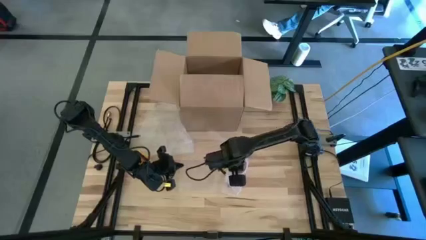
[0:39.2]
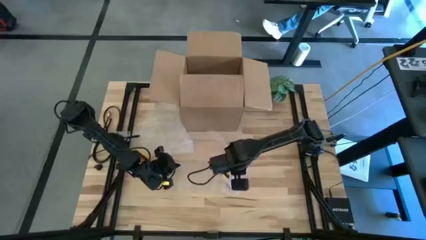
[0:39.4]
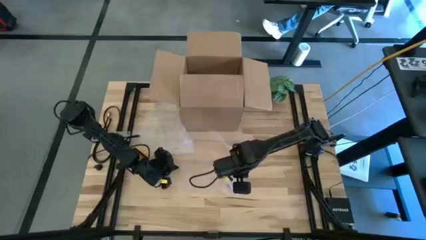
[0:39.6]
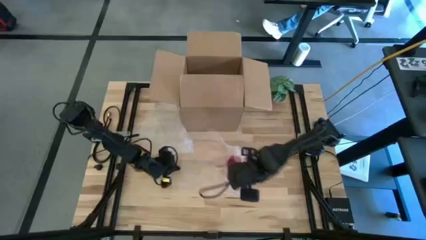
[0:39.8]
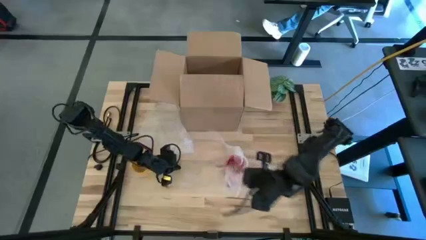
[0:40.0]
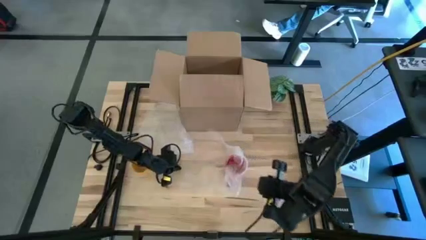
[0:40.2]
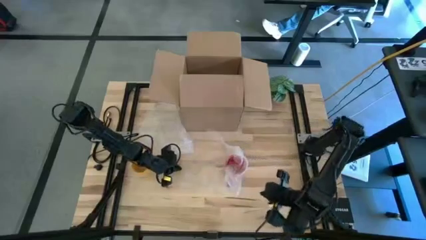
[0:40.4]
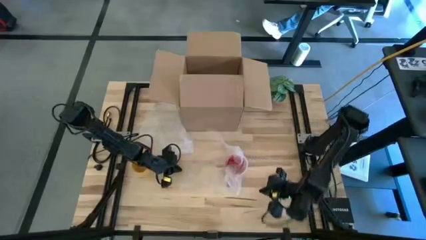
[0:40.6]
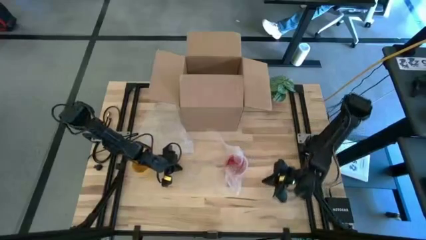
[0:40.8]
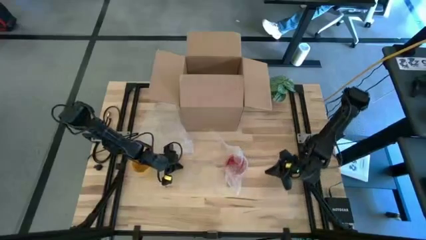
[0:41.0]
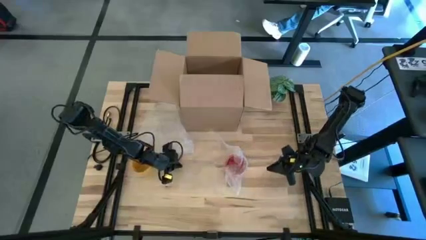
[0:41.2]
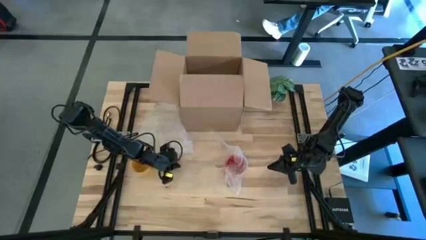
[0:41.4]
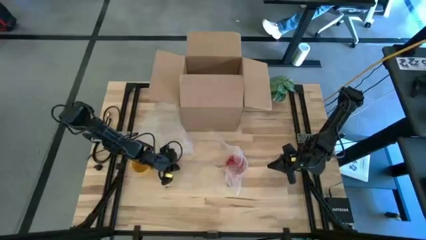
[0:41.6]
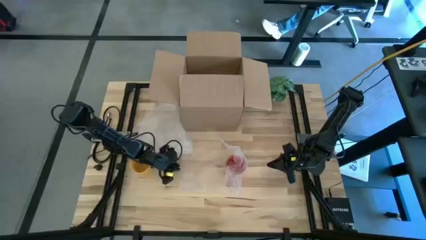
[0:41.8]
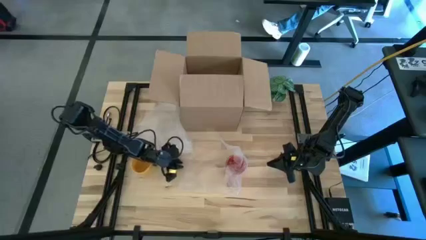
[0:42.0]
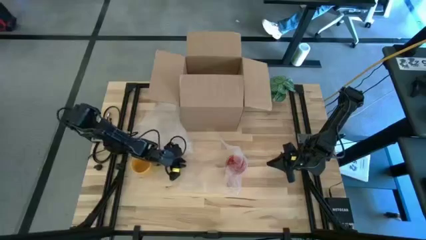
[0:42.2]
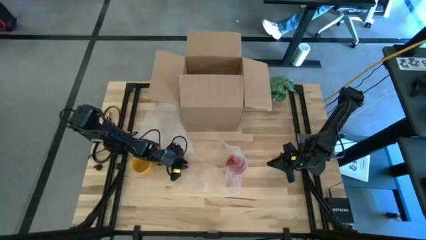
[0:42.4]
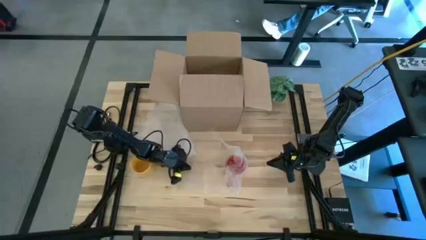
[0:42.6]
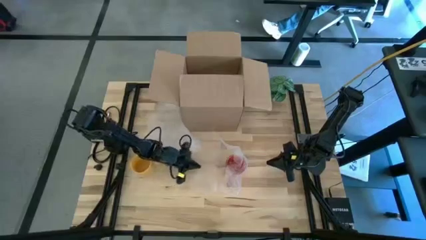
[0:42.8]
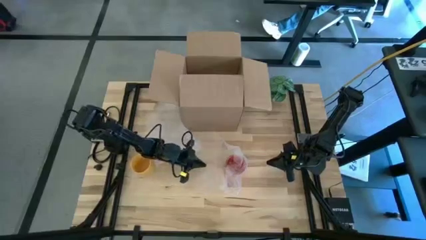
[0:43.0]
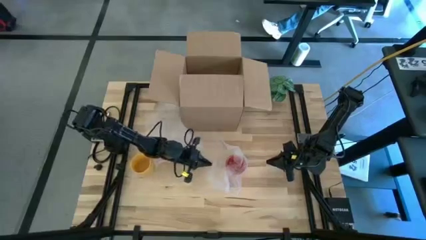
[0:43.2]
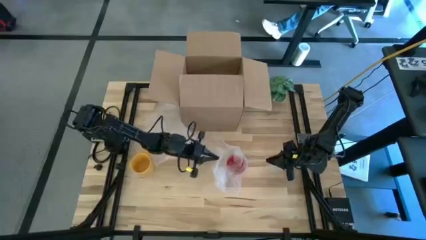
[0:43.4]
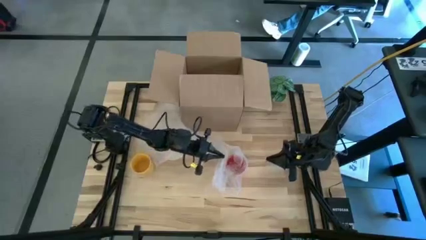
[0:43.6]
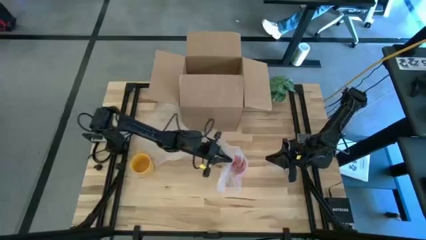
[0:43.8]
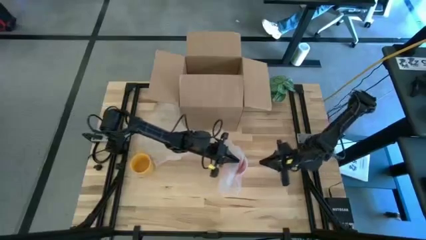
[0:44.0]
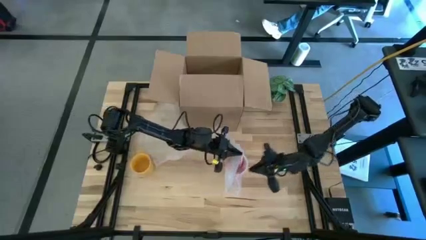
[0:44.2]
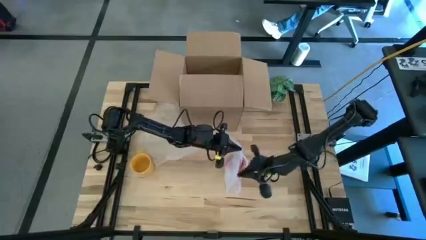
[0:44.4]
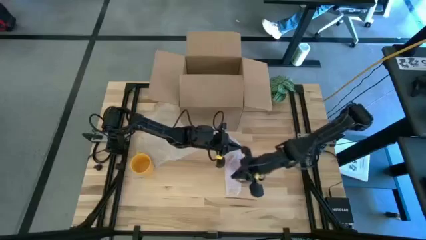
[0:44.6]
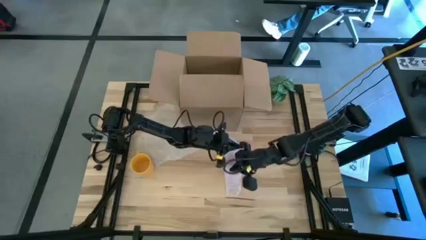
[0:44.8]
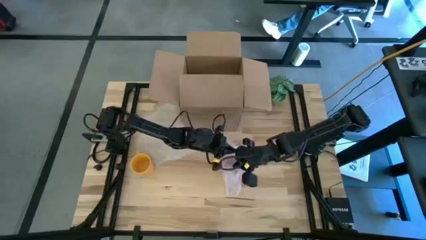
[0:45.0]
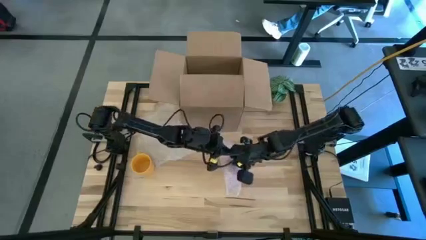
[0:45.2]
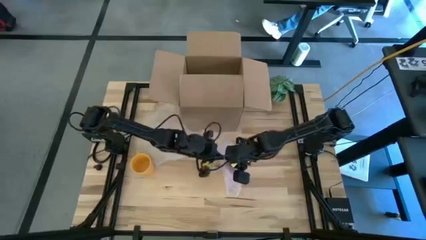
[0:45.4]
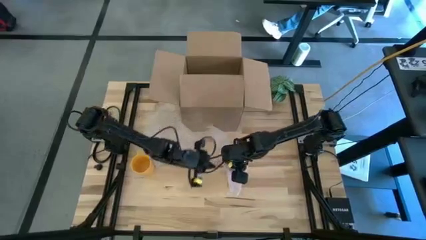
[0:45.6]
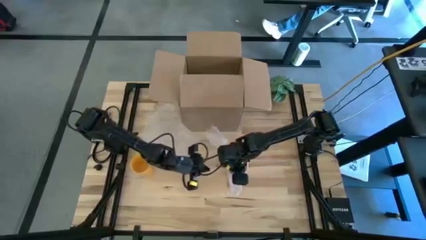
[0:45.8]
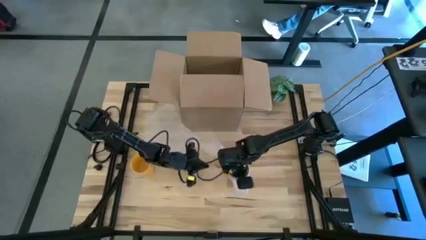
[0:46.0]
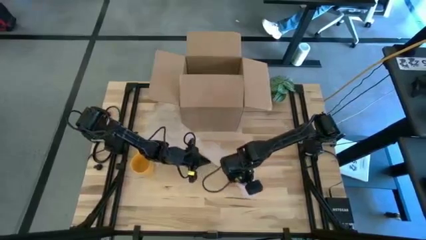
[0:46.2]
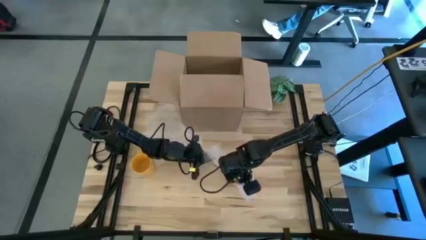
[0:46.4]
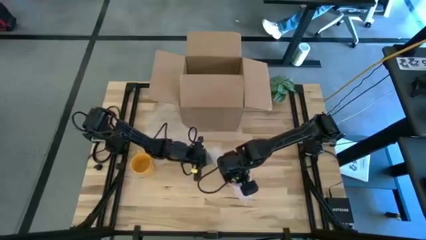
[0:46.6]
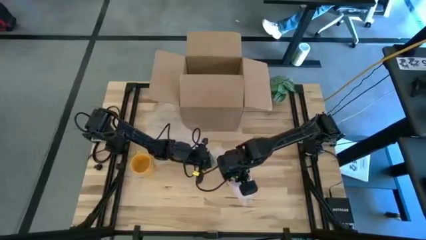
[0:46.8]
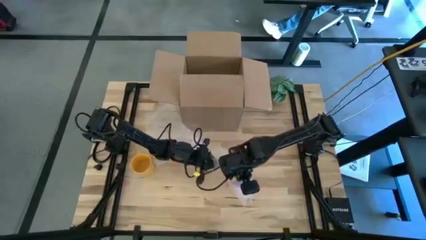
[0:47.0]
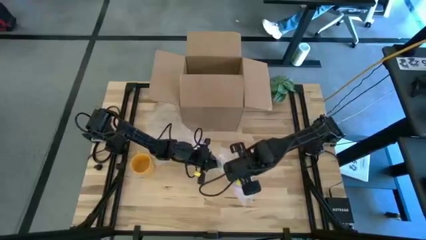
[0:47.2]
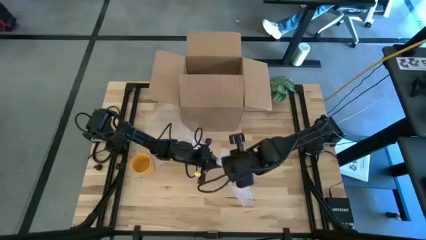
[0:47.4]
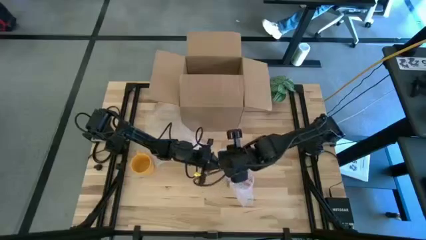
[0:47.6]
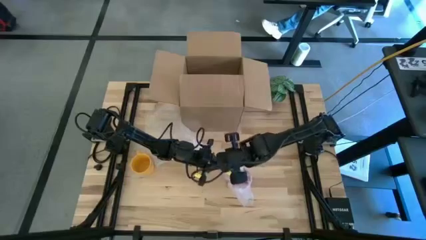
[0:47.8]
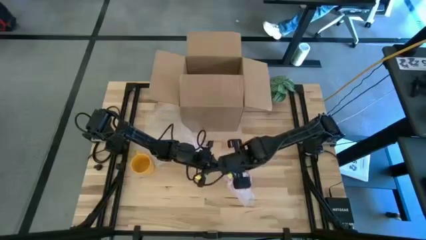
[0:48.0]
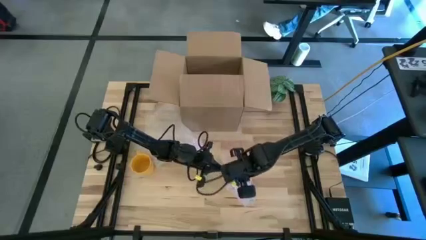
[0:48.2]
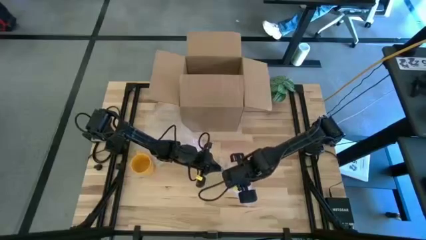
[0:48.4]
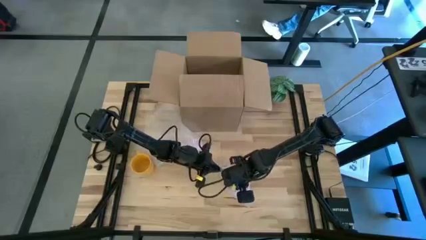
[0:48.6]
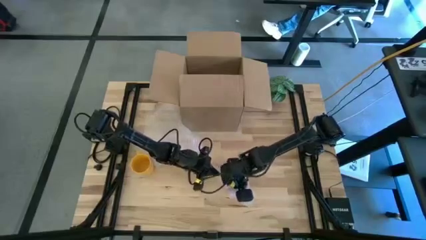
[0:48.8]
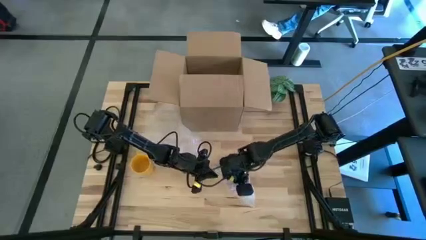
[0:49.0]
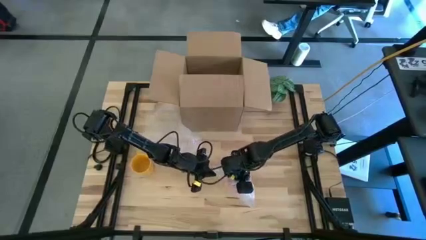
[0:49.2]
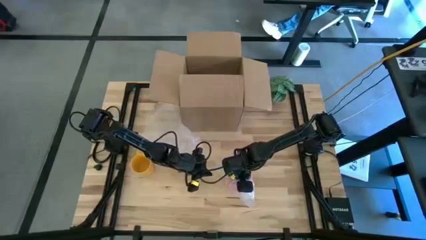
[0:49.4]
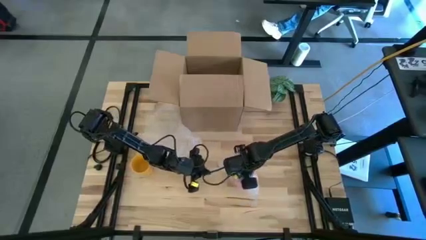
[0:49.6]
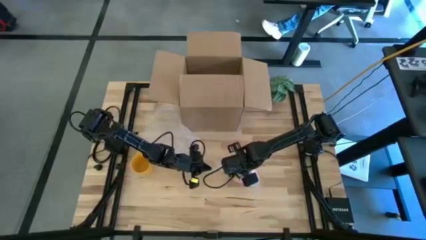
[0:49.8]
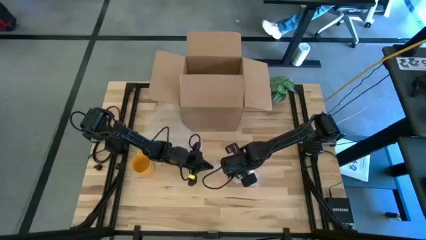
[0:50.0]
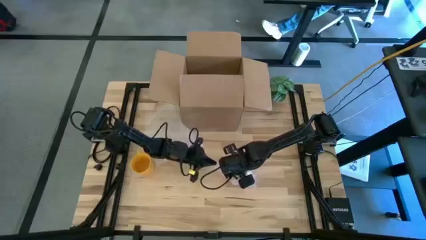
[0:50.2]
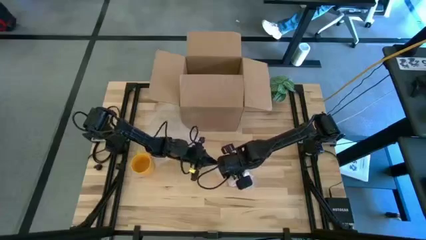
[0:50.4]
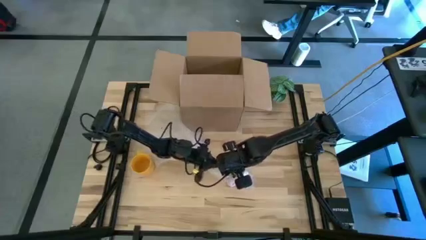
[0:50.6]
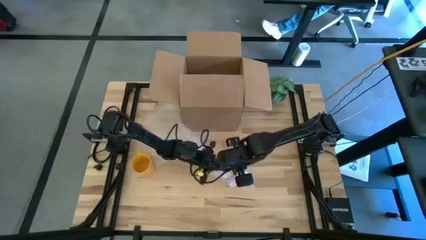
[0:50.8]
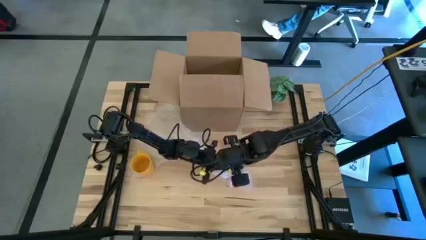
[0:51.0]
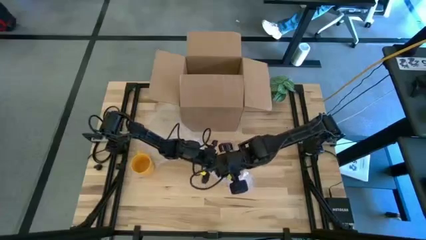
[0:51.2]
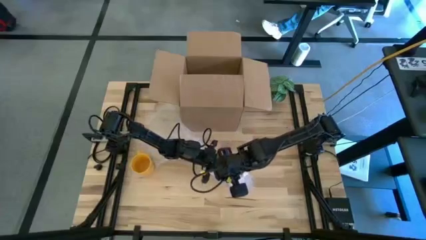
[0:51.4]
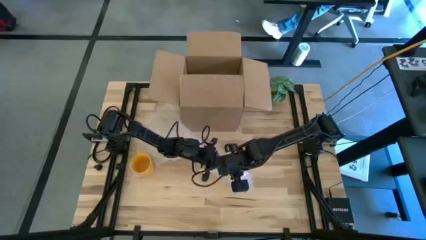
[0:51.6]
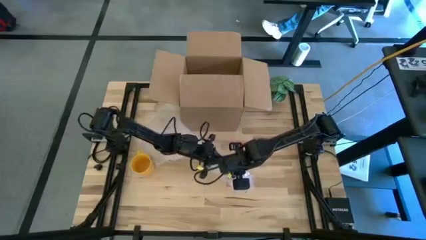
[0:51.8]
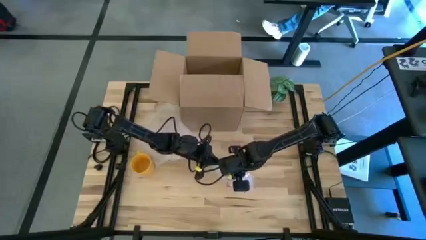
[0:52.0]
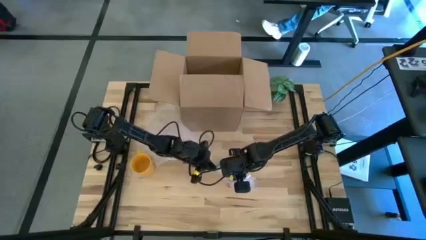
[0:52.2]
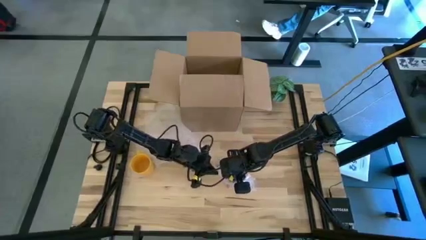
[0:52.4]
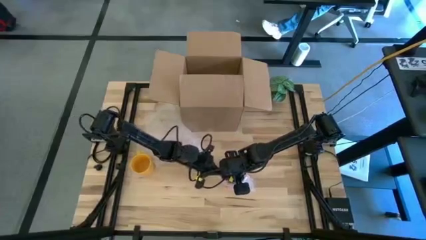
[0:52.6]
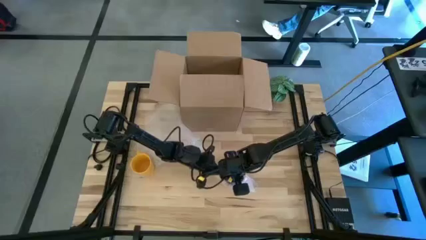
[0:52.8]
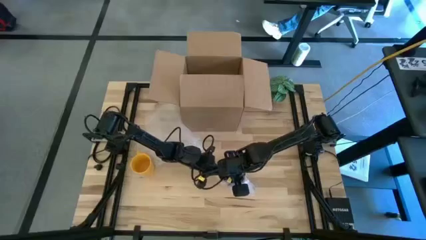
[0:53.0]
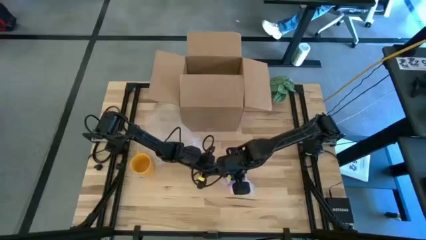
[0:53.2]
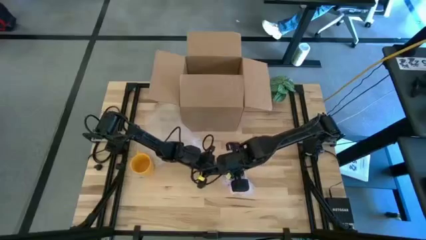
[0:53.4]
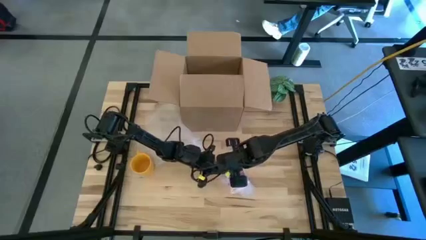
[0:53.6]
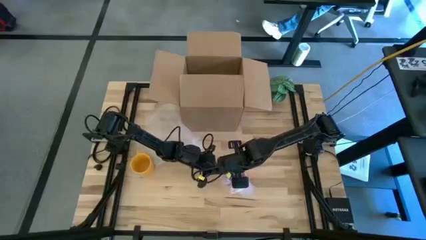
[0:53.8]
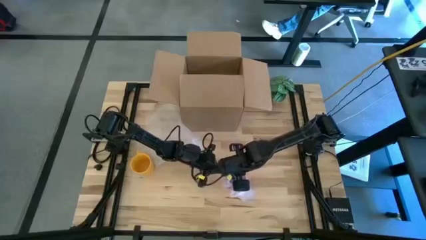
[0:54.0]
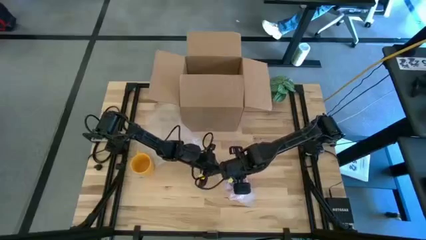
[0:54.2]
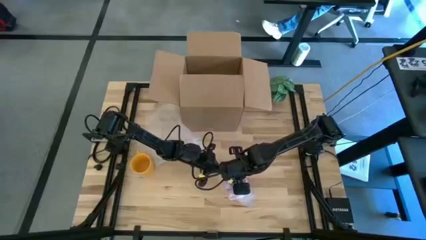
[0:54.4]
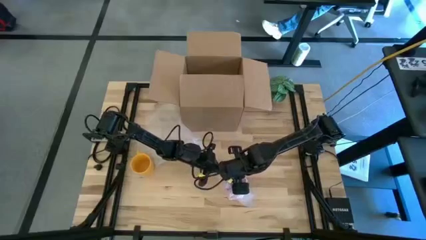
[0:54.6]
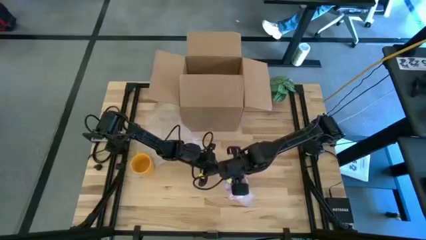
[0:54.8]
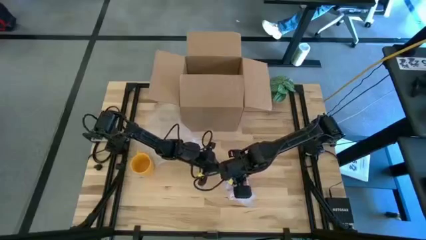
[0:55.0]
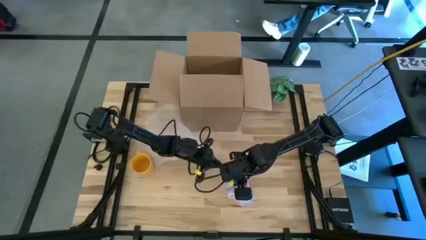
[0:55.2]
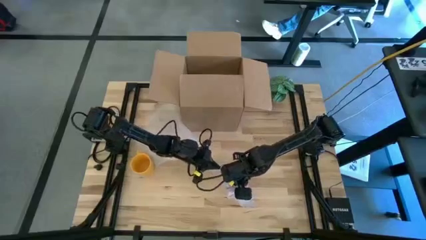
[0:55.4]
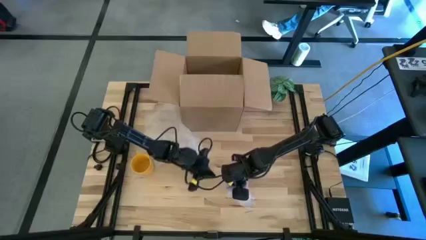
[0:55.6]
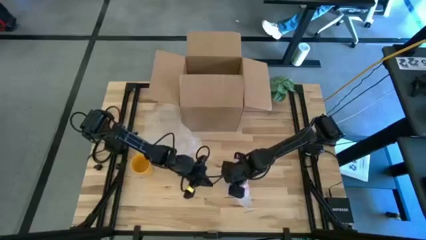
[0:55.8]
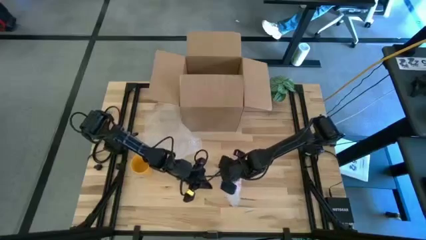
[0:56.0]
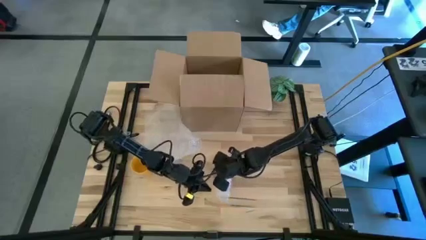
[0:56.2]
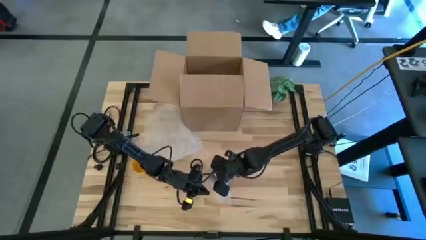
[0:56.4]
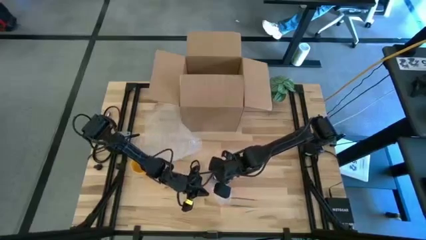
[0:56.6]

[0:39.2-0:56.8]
Task: wrap mug
Wrap the red mug with the bubble wrap
